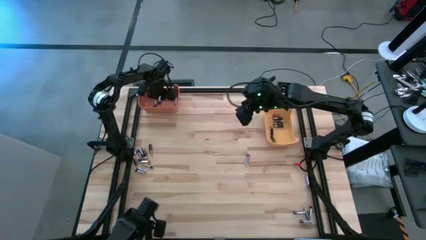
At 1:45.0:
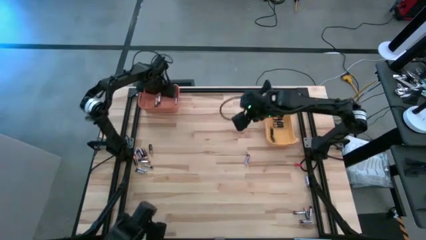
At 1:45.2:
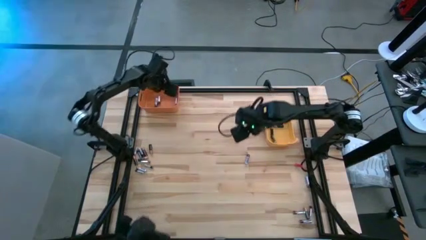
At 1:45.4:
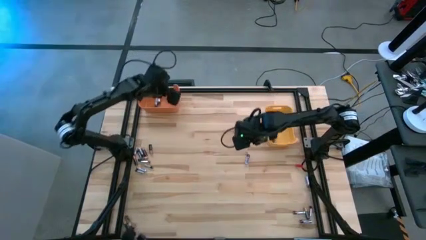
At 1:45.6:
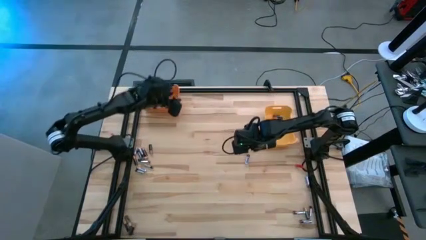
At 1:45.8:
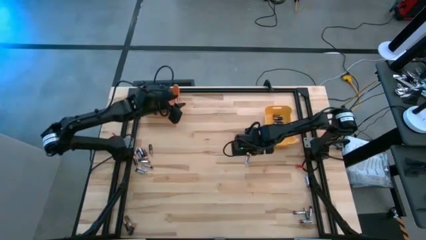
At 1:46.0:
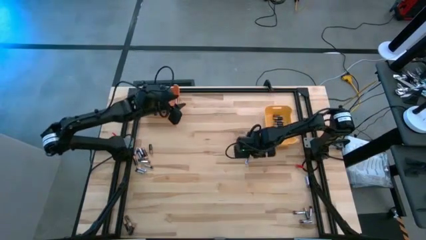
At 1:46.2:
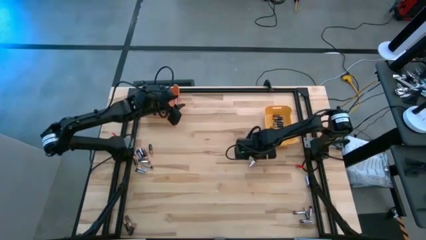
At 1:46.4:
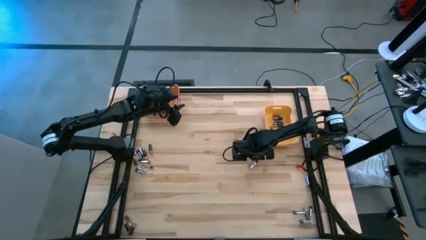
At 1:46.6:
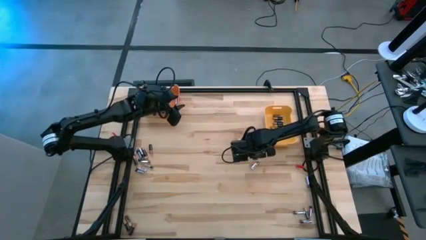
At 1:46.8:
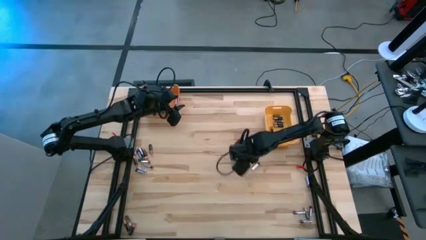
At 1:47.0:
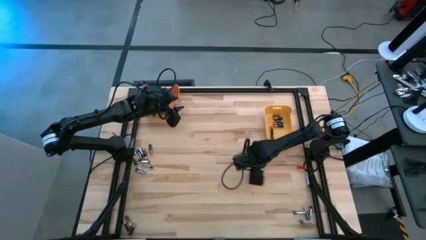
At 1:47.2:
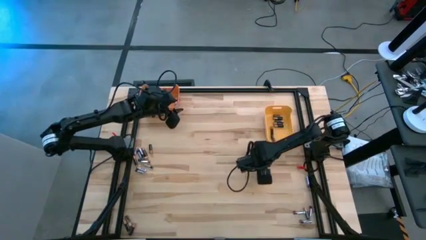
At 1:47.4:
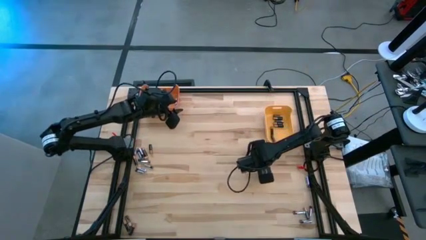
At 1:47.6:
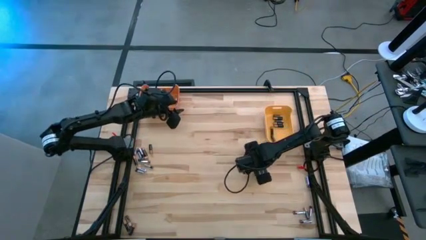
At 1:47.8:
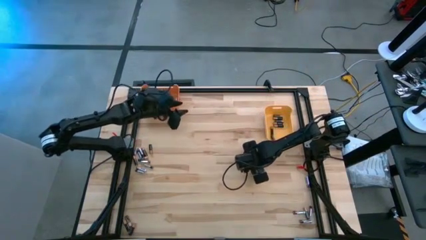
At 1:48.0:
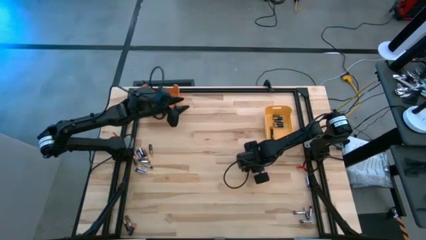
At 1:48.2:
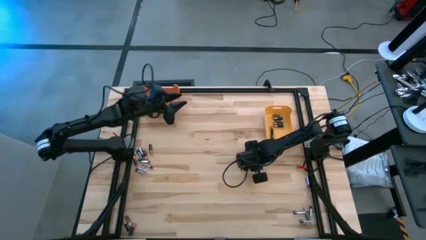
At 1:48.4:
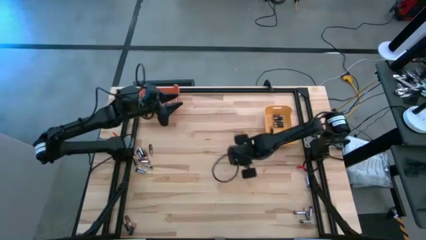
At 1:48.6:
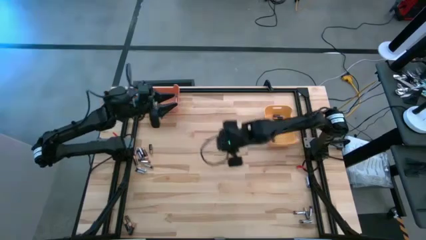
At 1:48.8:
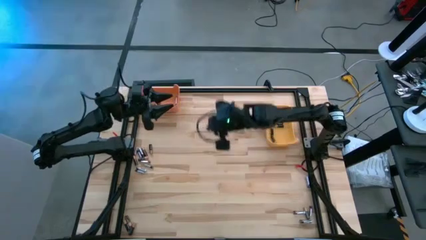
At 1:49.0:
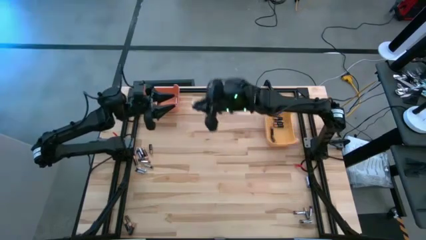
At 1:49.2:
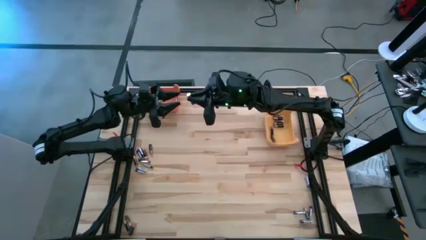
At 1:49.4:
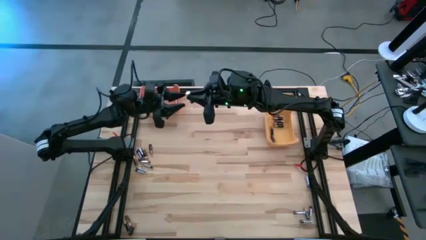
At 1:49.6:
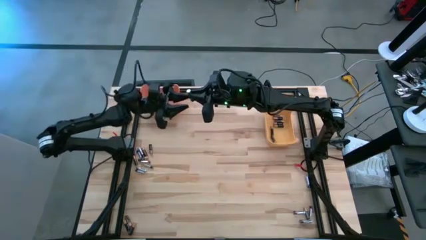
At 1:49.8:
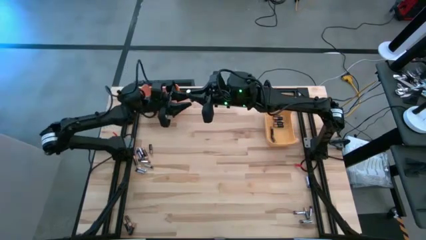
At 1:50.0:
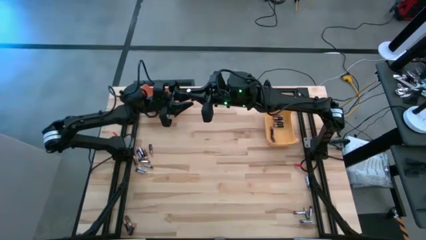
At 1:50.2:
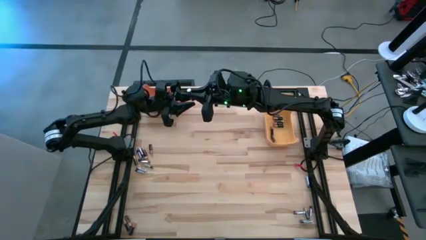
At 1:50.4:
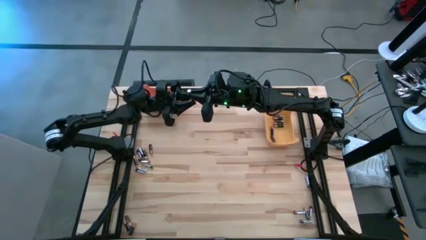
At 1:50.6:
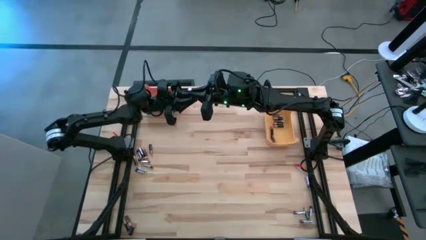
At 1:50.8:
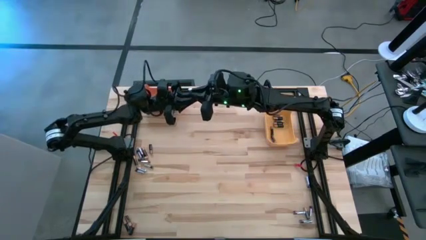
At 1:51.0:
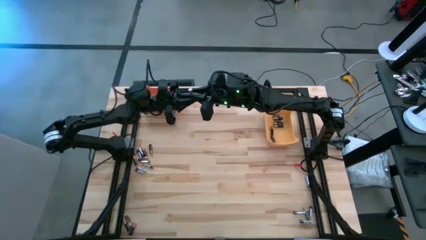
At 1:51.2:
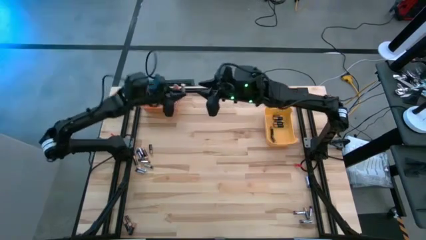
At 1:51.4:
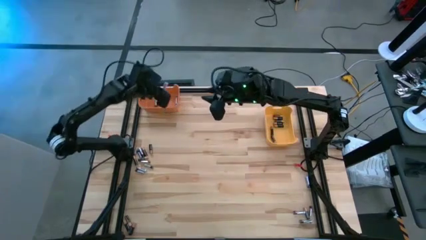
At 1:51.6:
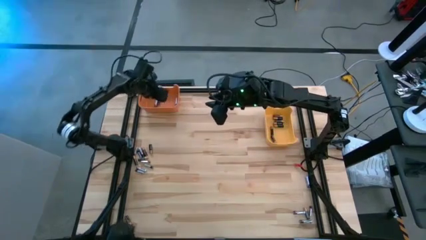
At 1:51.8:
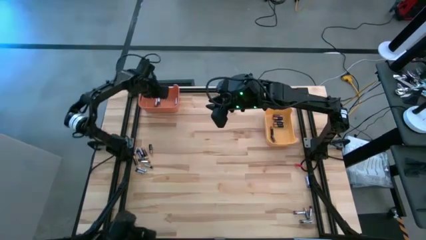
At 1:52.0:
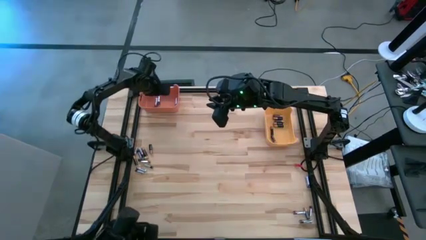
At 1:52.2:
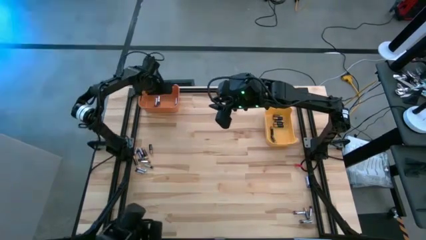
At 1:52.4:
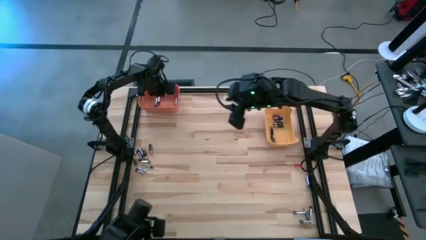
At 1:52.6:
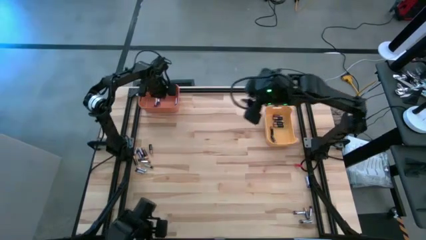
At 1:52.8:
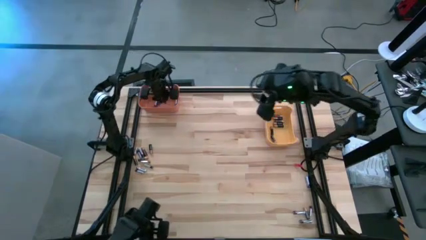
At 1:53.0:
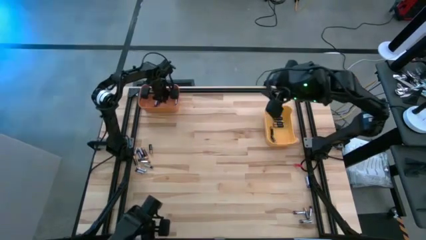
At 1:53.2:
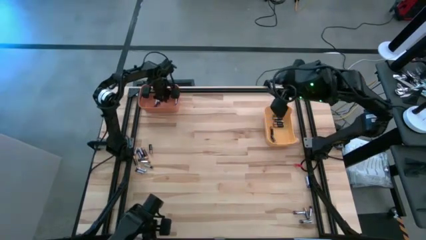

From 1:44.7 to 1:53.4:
Task: Sort batteries
Put the silver battery into the orange bin

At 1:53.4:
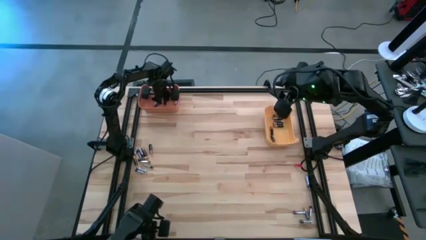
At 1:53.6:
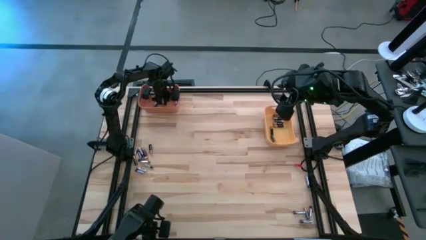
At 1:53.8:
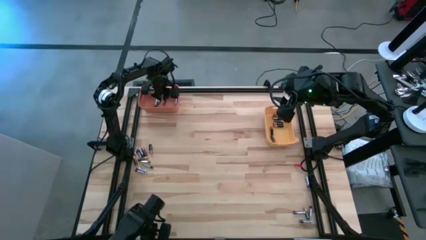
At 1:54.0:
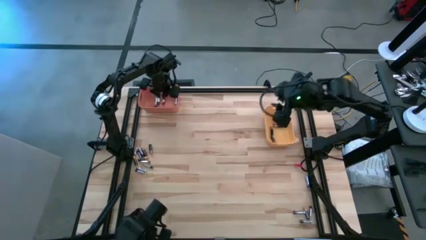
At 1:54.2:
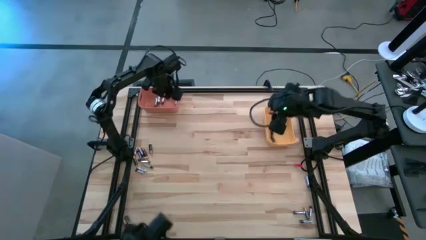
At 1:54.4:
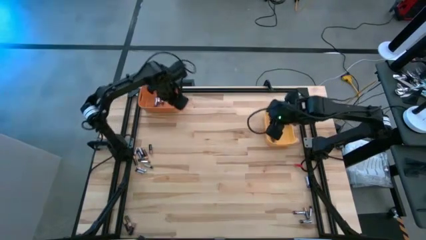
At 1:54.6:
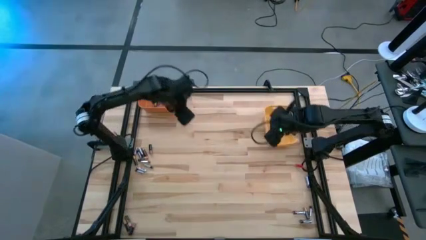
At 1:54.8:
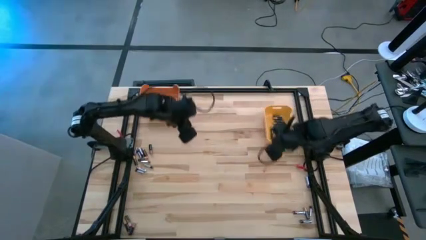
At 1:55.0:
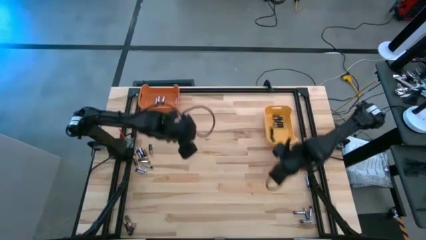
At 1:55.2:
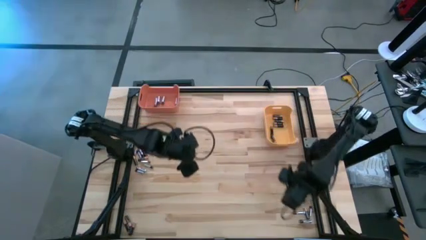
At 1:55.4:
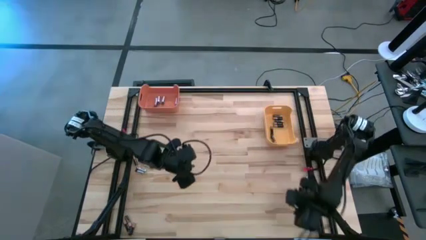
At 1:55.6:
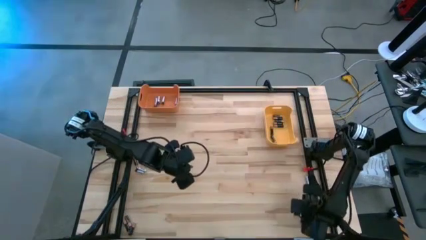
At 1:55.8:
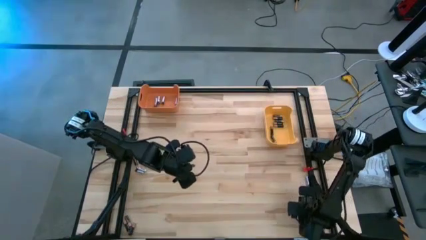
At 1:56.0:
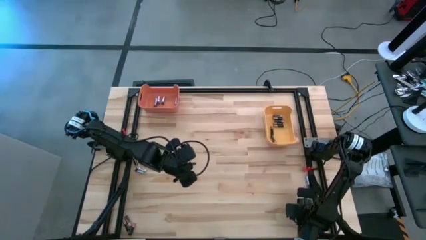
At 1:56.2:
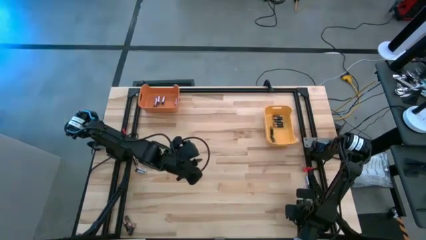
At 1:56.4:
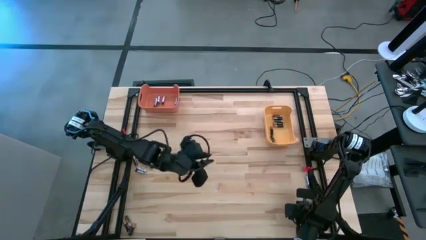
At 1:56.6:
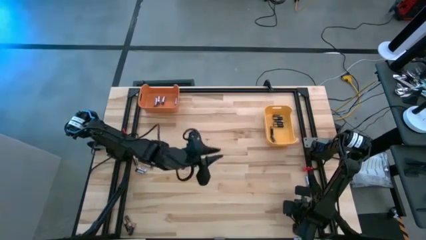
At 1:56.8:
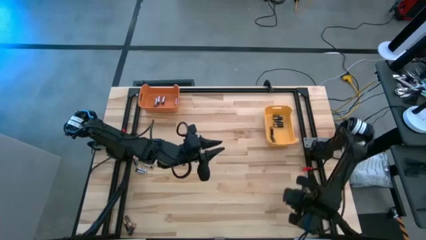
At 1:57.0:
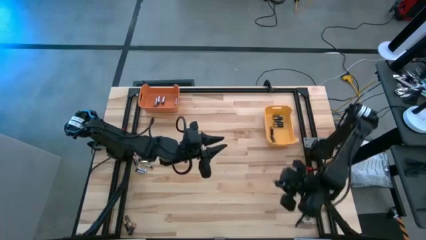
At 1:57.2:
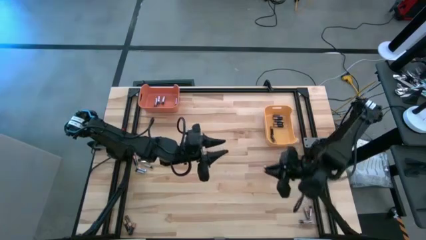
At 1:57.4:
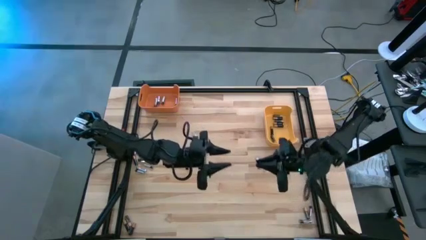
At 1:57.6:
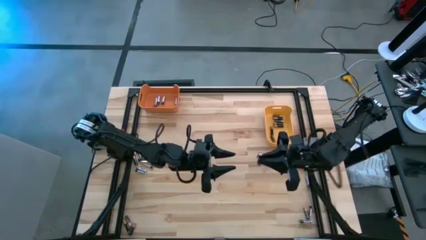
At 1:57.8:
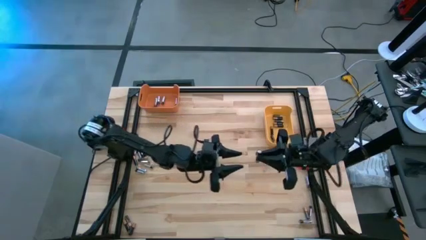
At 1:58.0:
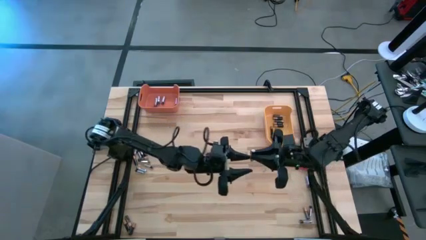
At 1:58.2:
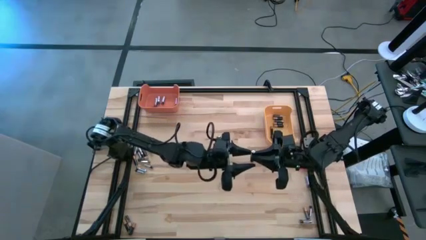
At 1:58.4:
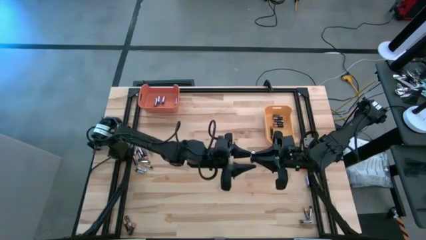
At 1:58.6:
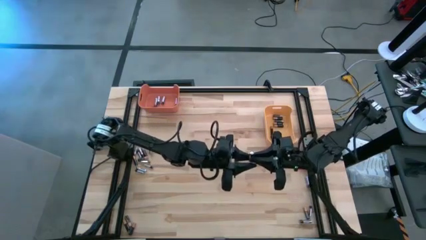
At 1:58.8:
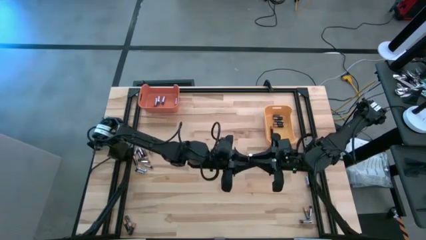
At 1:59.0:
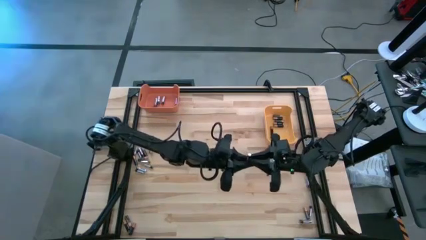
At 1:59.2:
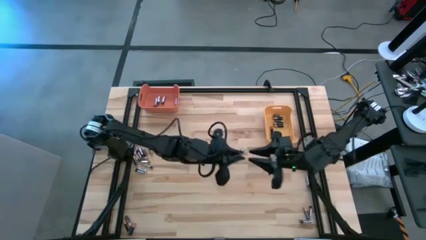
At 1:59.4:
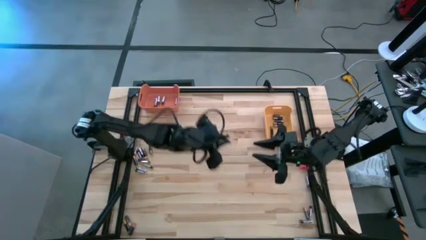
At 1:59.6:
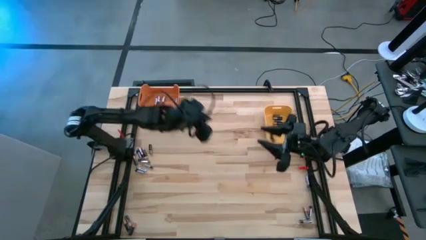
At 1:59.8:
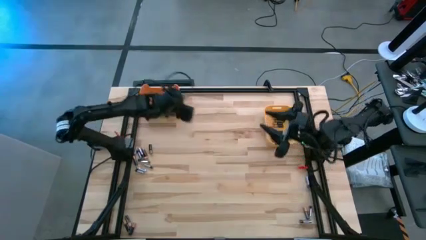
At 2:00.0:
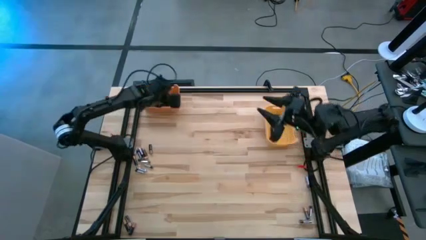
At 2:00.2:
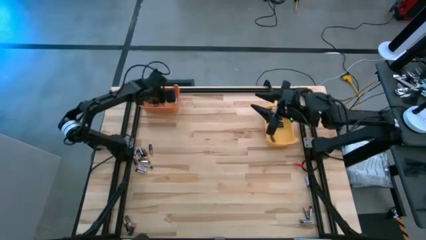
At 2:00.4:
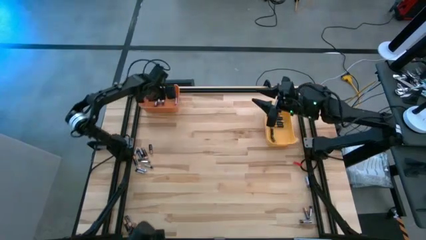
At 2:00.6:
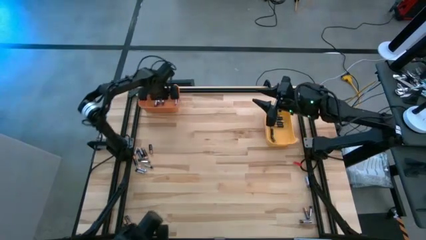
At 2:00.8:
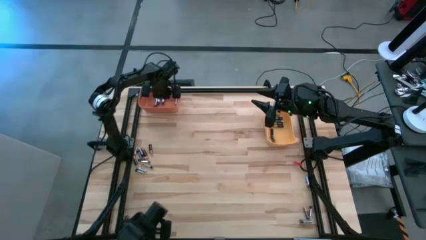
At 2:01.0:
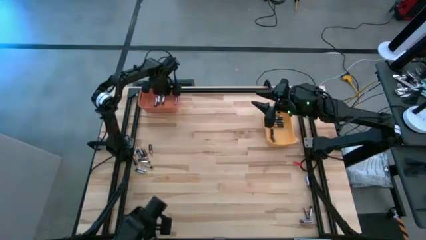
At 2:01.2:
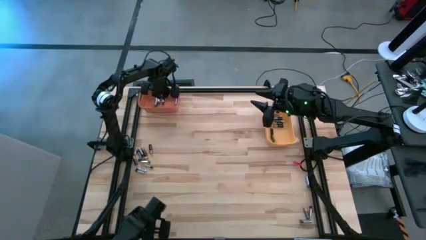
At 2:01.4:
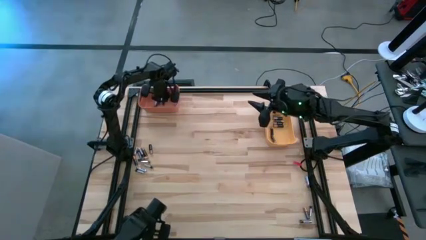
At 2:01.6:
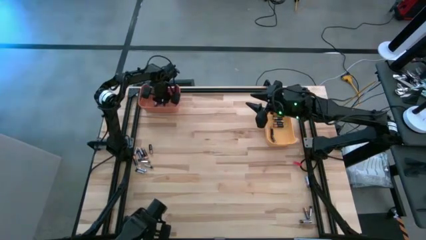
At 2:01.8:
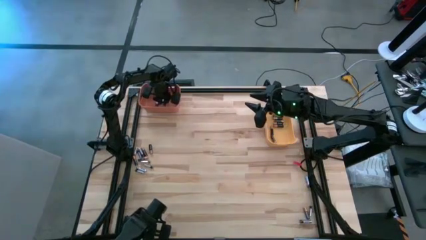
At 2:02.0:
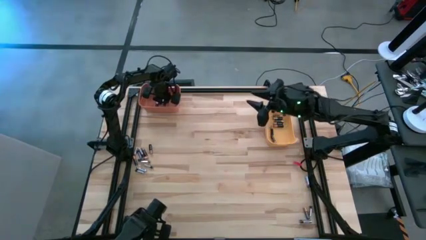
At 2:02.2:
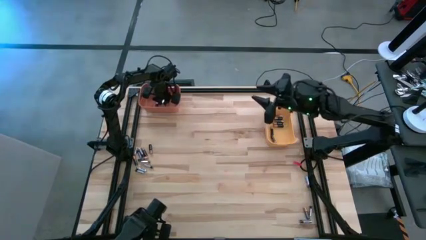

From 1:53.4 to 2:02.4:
Put the silver battery into the orange bin
